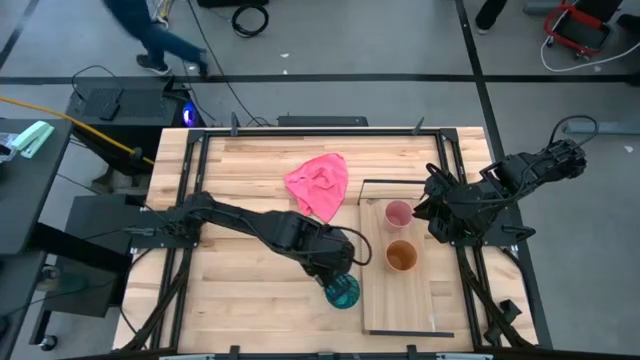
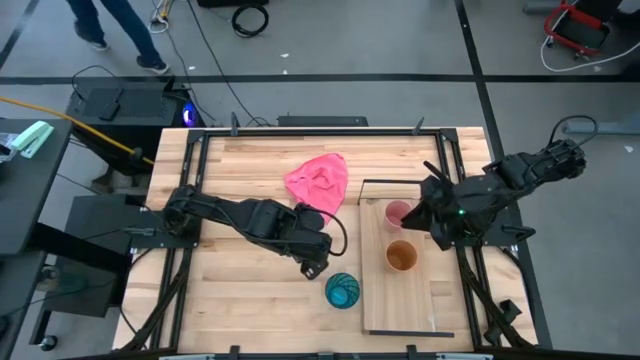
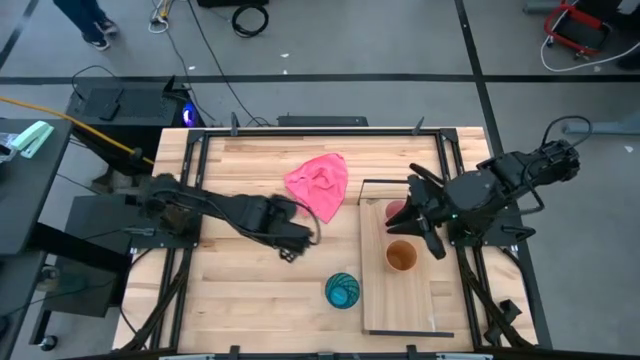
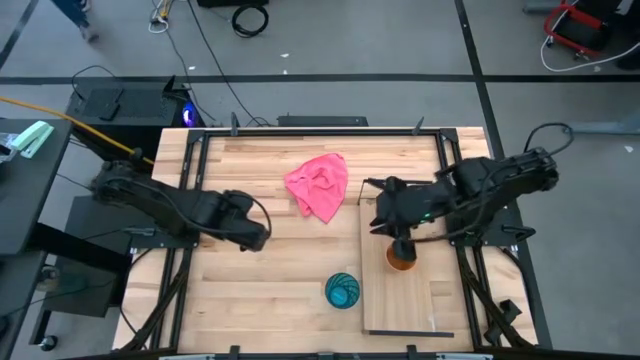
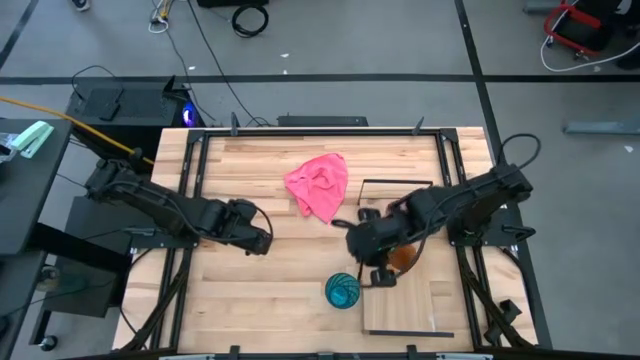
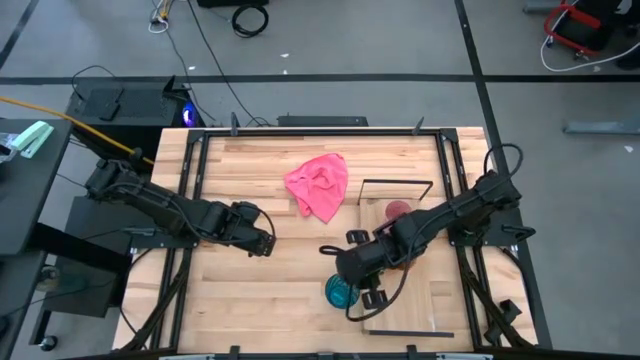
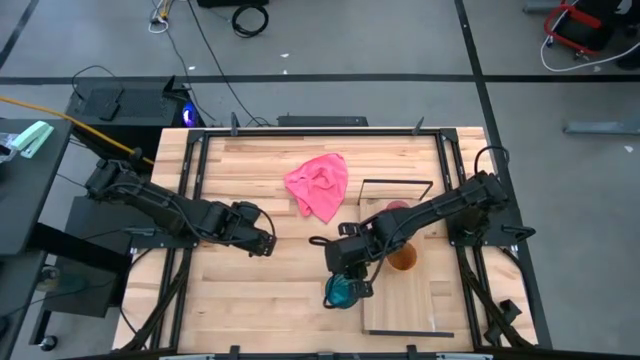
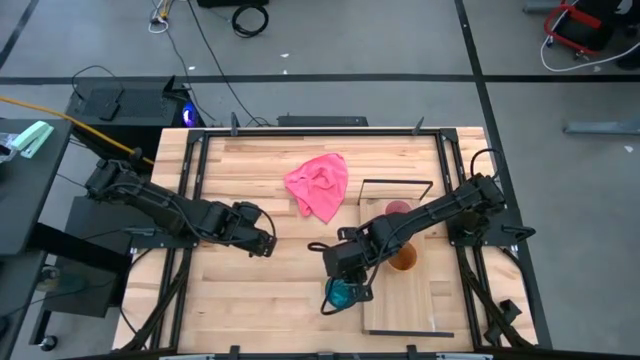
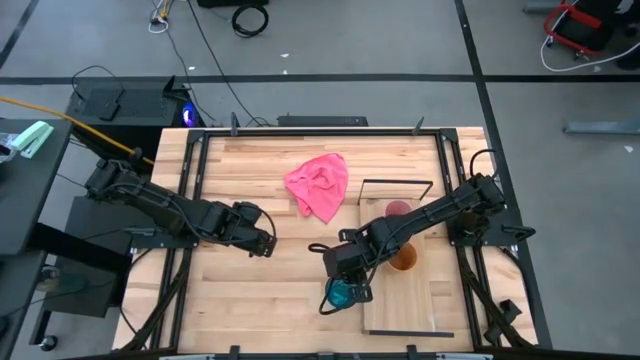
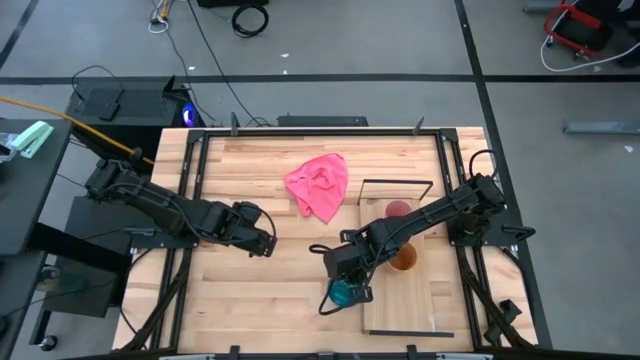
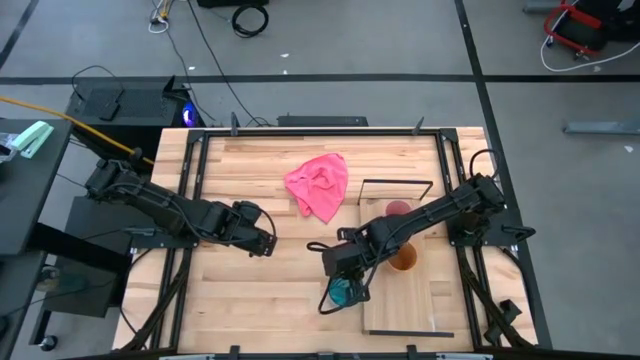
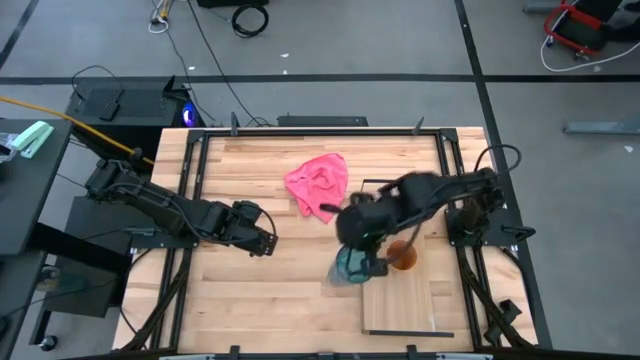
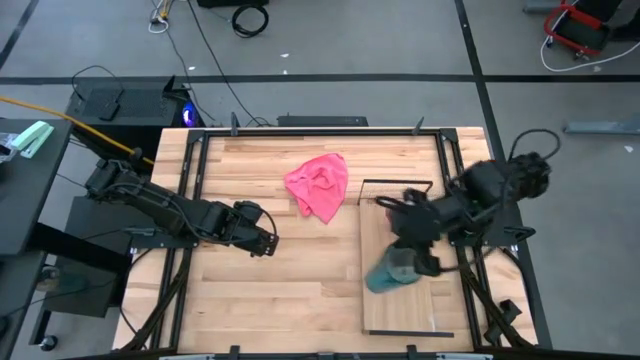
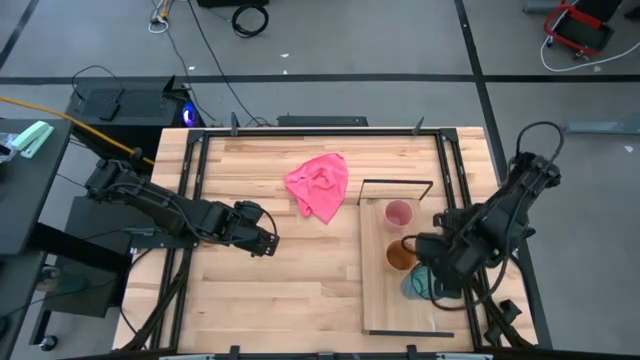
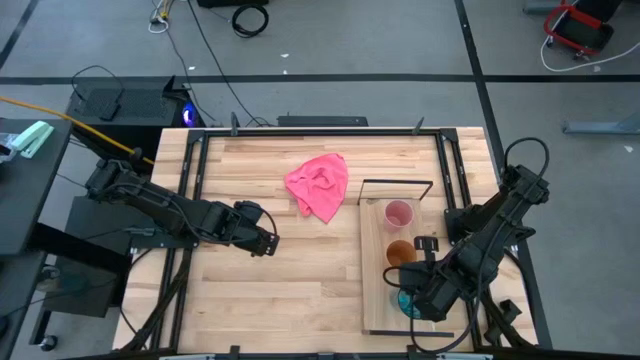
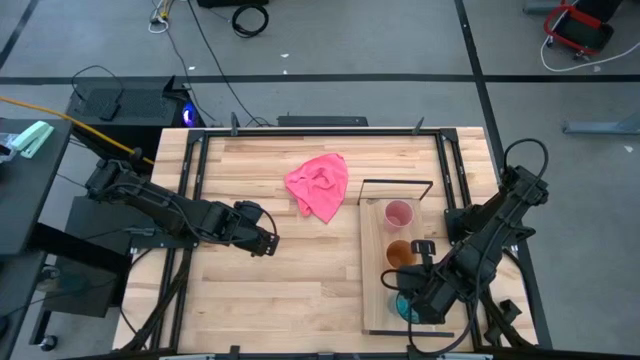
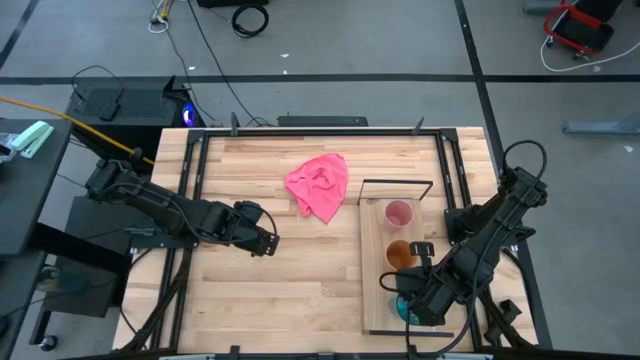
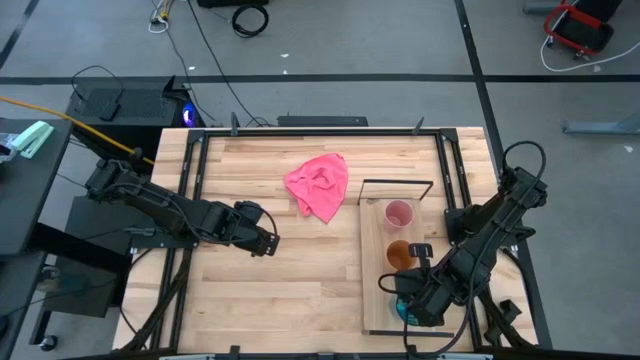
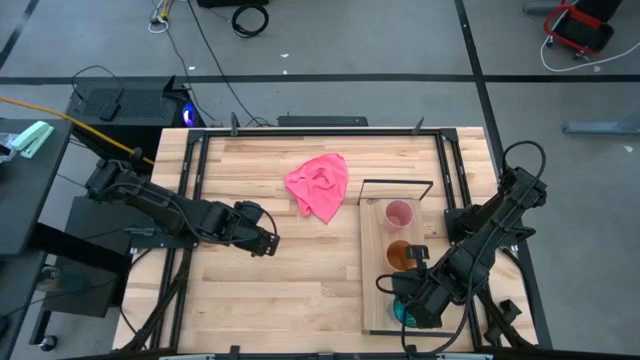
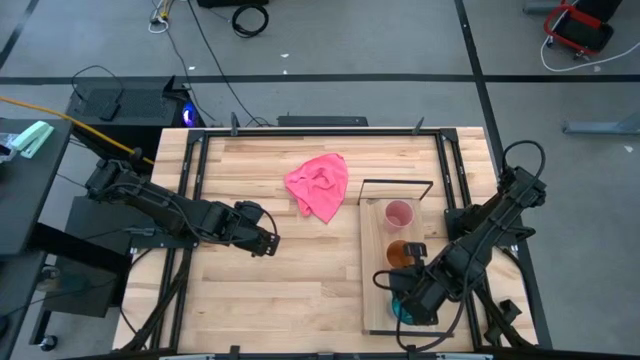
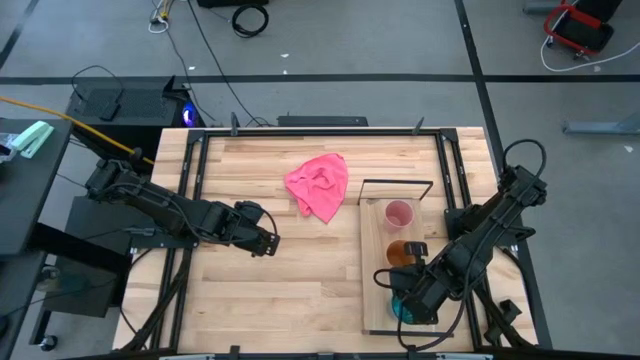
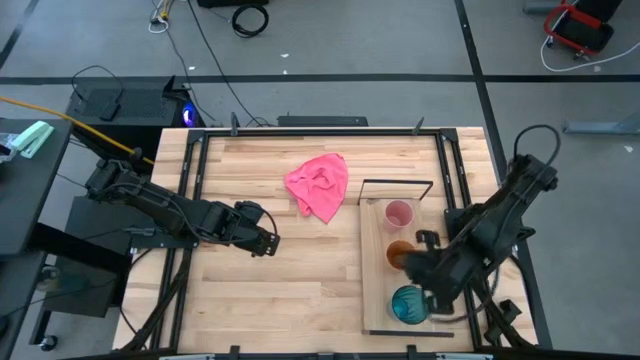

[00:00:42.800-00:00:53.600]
Task: Stack small to large cups/mugs on shelf
Put the blue plastic glass on the shelf

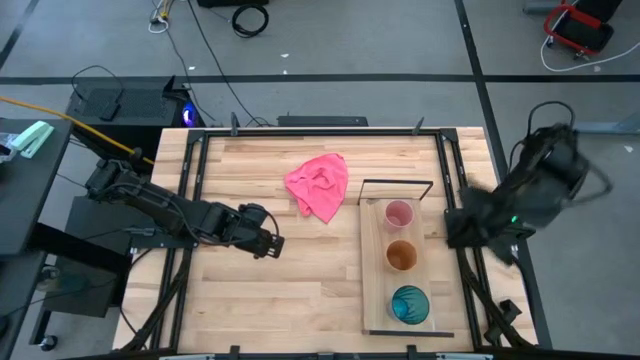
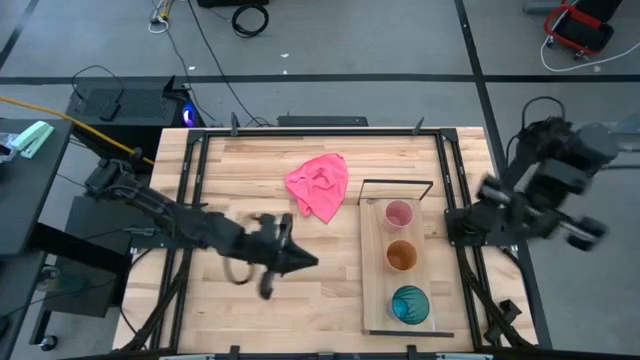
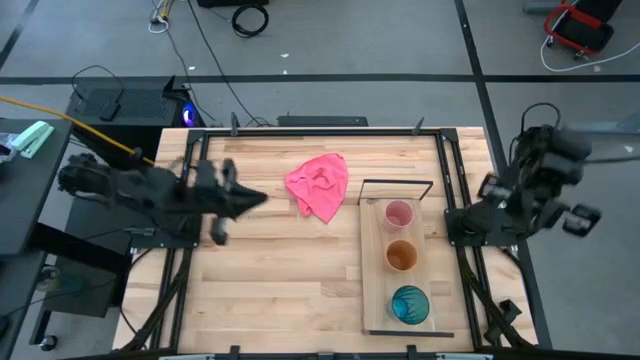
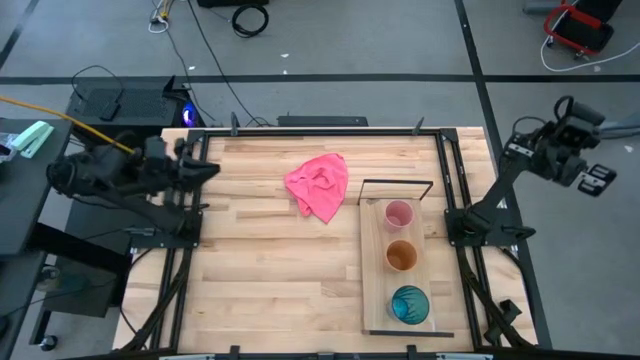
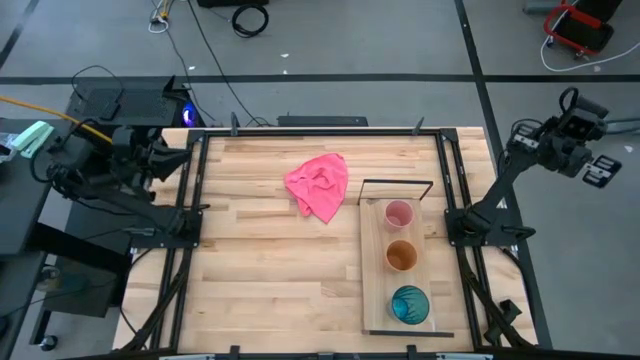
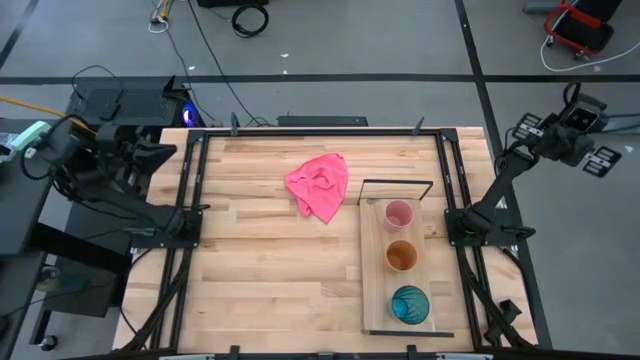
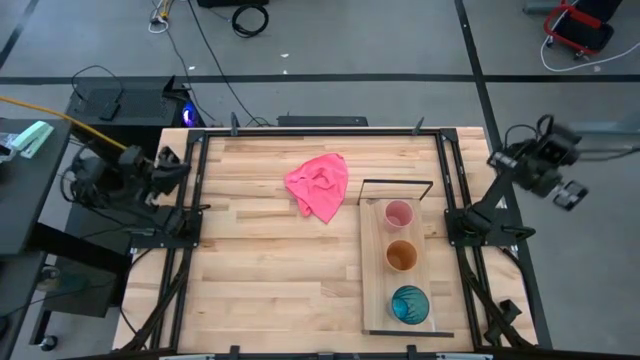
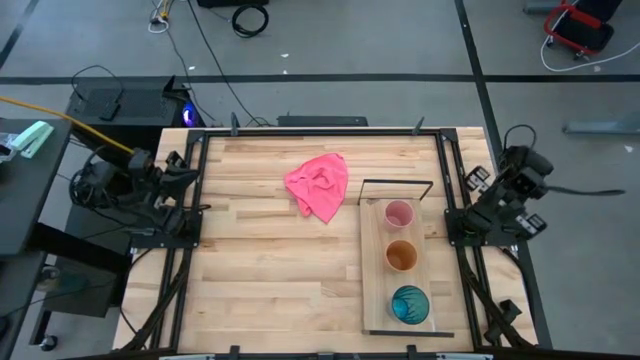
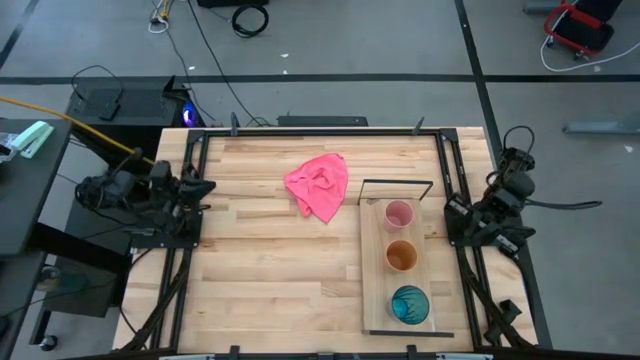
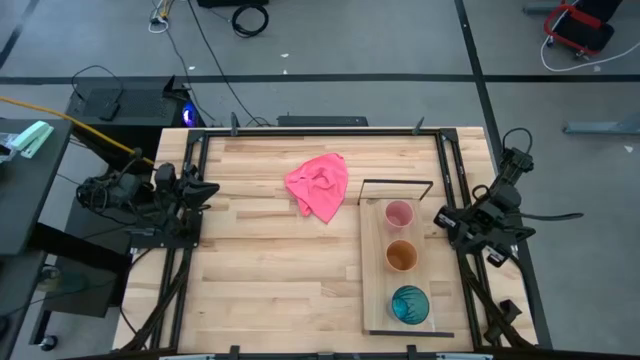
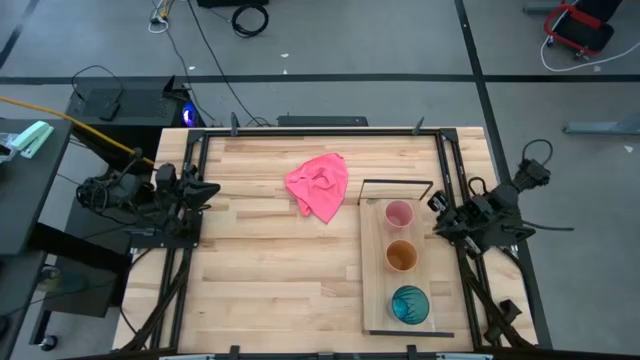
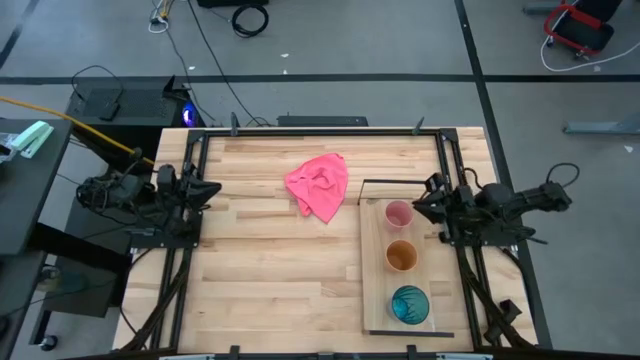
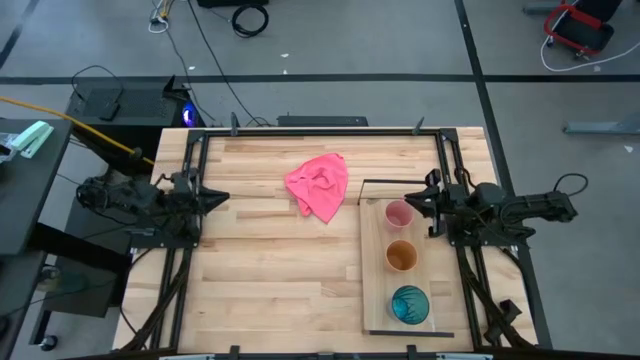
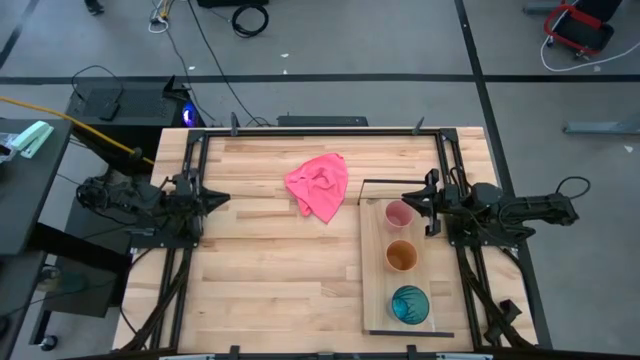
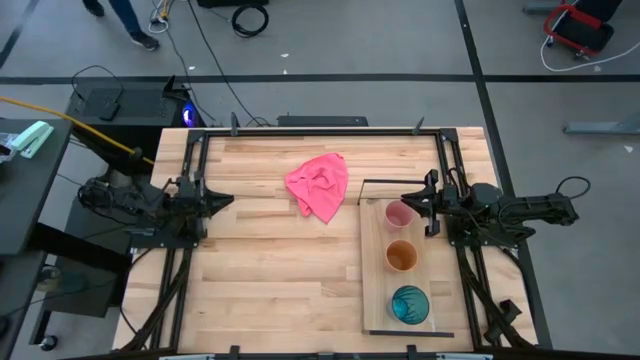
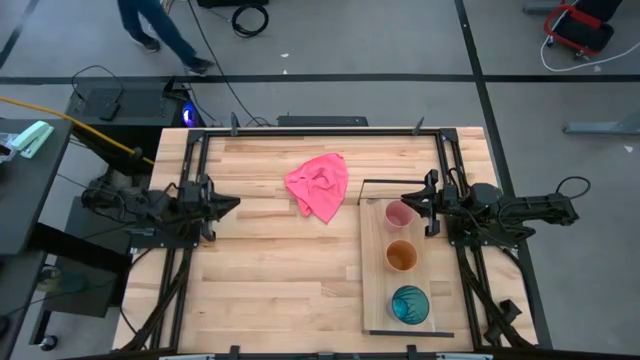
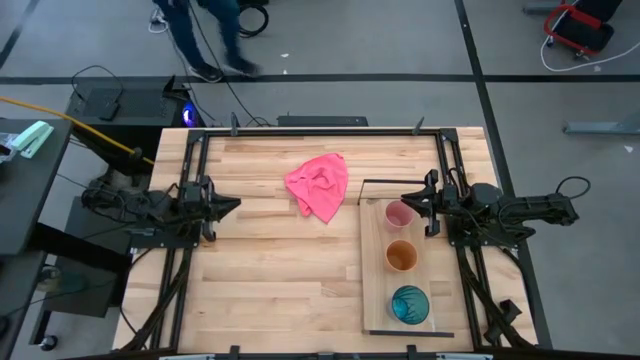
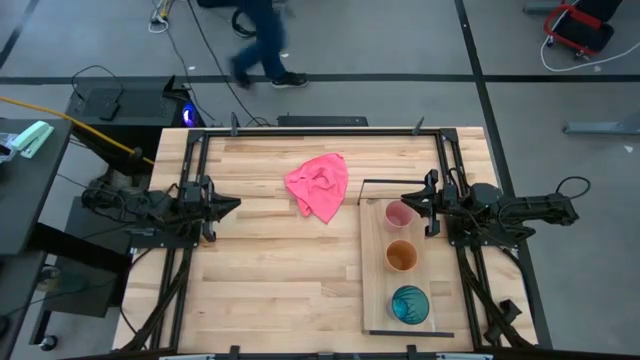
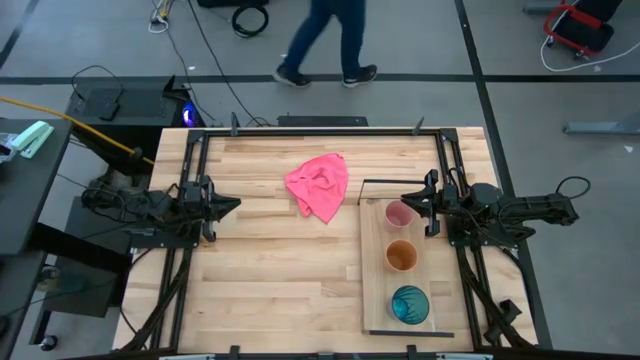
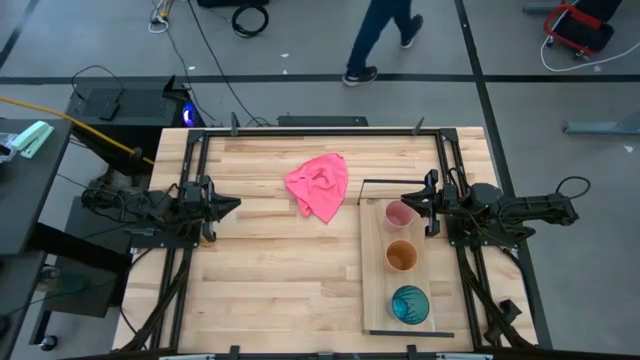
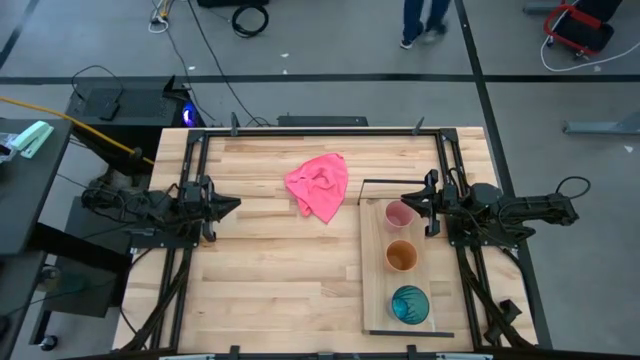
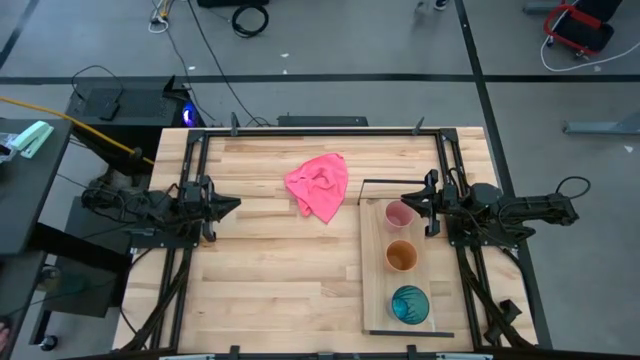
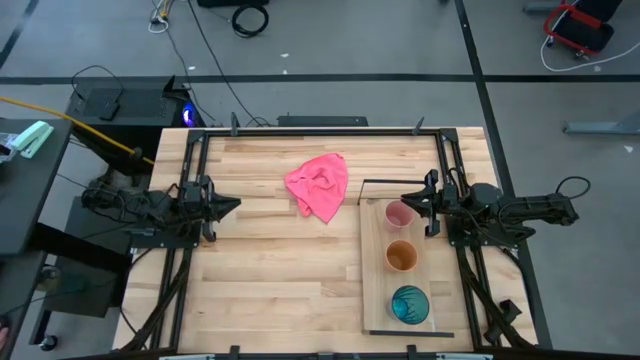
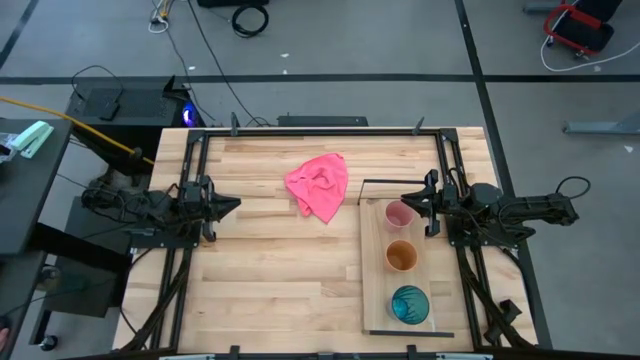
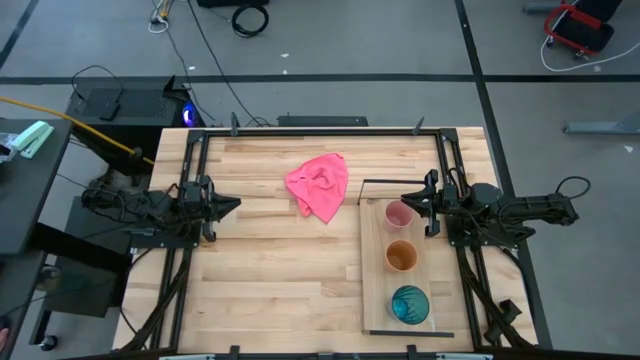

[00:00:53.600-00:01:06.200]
Return to Home Position
